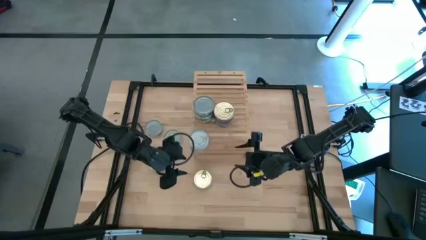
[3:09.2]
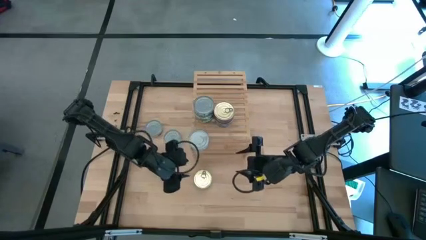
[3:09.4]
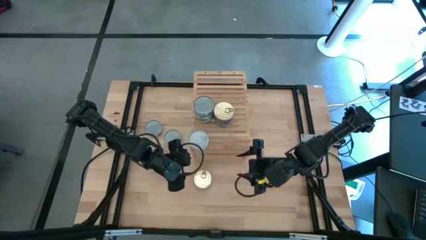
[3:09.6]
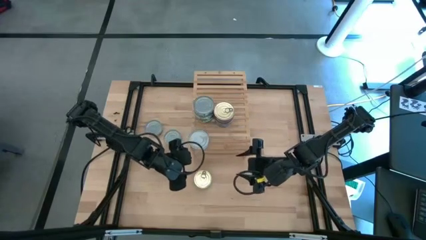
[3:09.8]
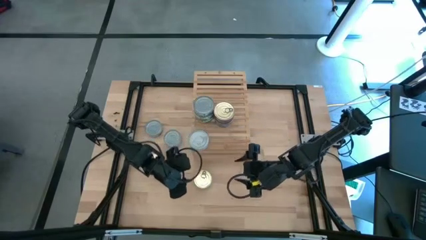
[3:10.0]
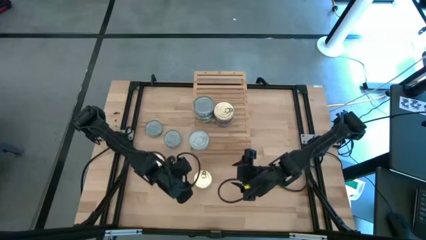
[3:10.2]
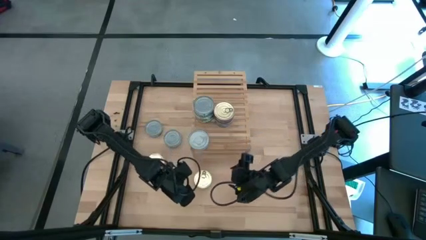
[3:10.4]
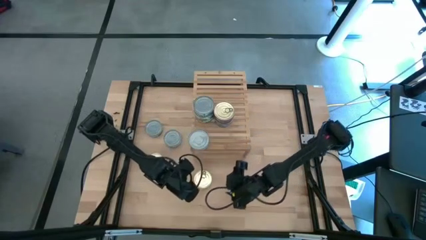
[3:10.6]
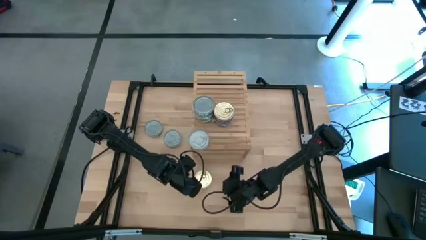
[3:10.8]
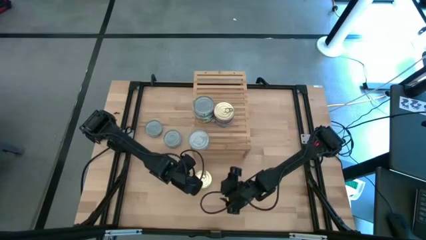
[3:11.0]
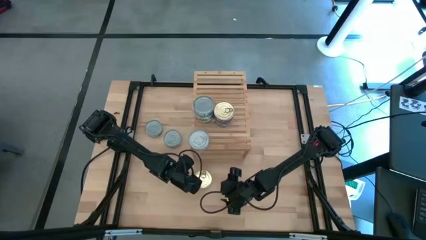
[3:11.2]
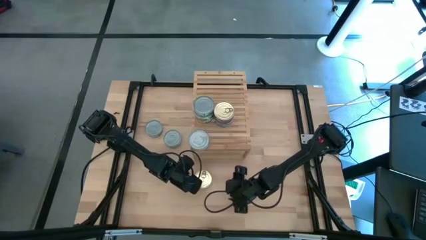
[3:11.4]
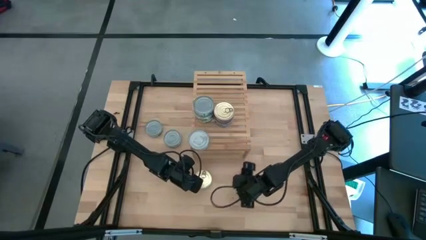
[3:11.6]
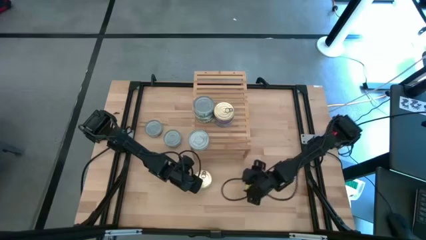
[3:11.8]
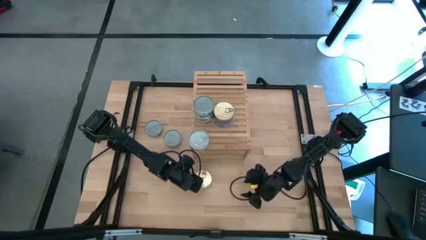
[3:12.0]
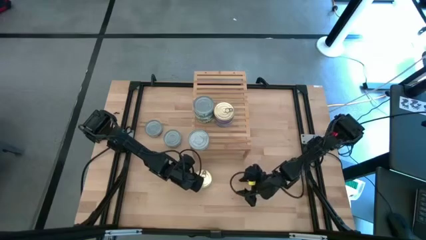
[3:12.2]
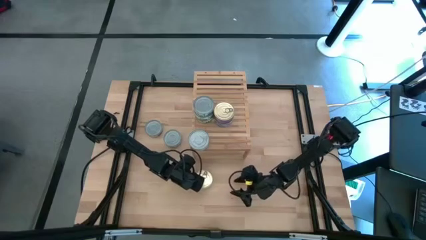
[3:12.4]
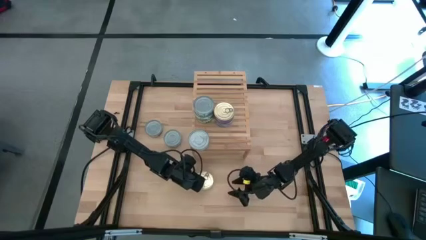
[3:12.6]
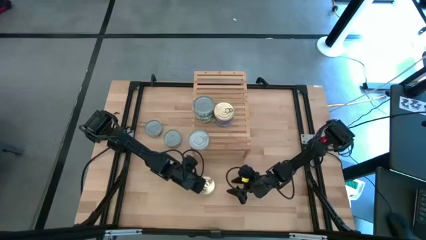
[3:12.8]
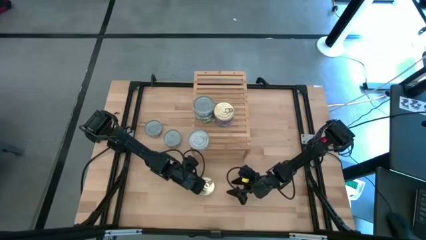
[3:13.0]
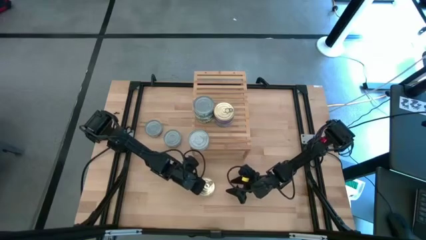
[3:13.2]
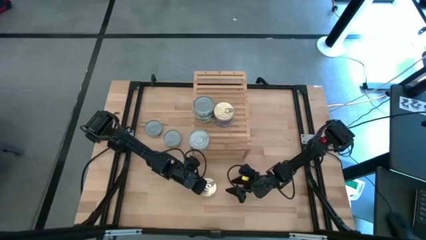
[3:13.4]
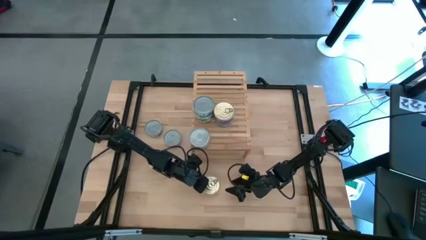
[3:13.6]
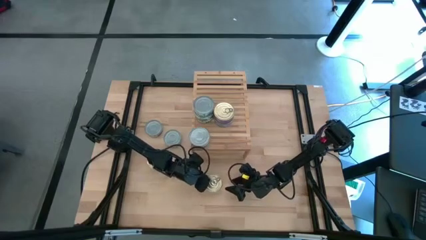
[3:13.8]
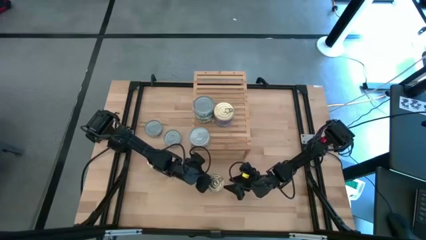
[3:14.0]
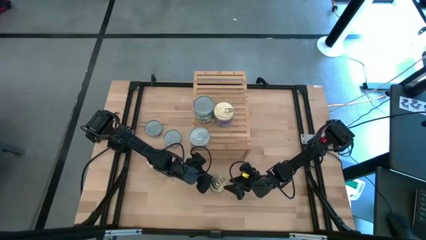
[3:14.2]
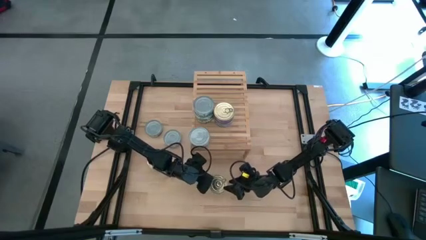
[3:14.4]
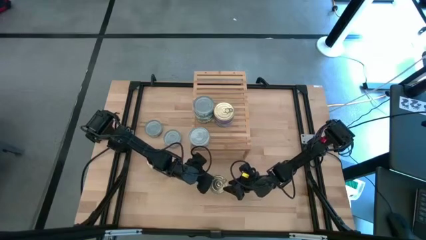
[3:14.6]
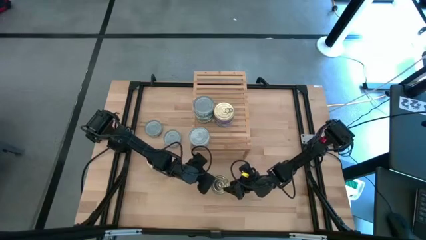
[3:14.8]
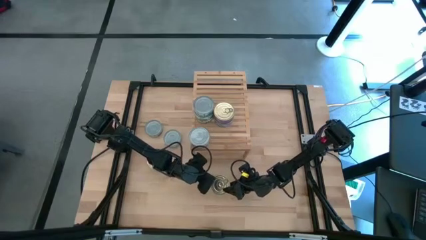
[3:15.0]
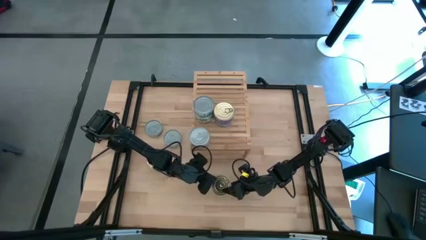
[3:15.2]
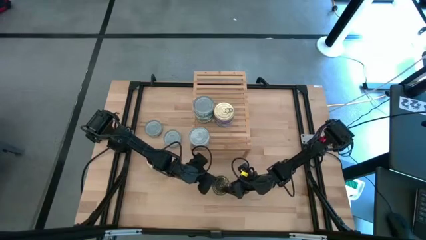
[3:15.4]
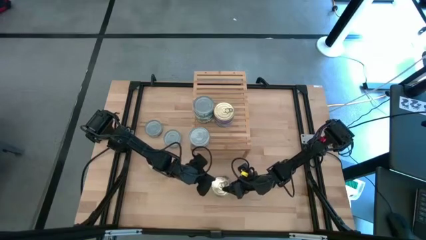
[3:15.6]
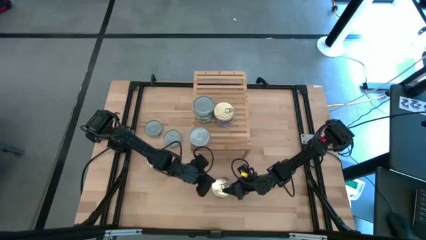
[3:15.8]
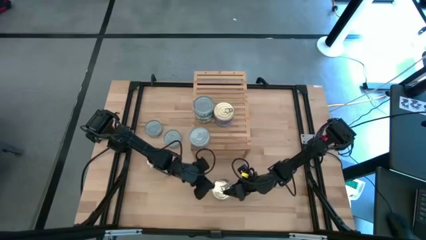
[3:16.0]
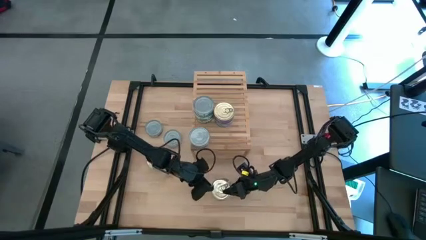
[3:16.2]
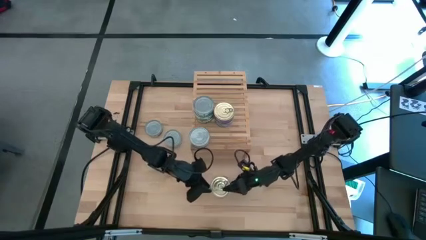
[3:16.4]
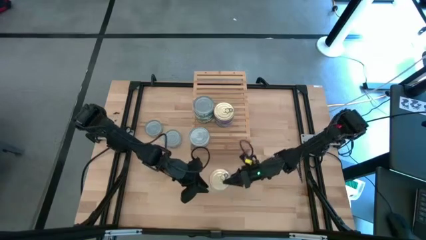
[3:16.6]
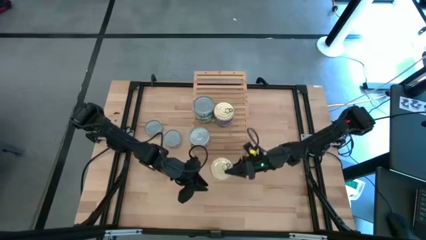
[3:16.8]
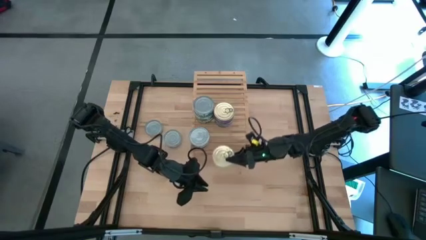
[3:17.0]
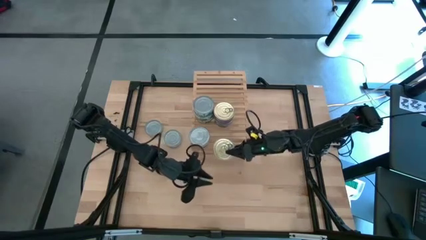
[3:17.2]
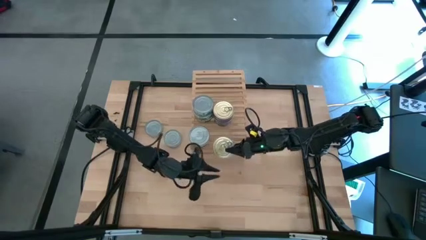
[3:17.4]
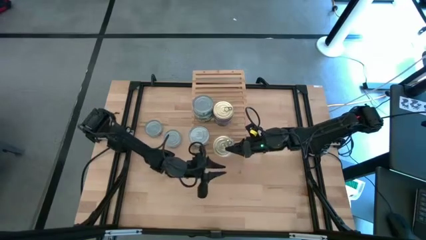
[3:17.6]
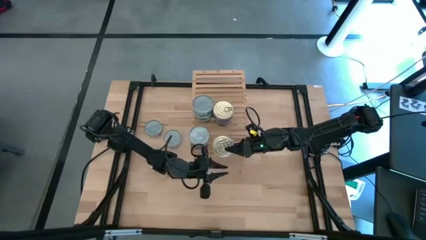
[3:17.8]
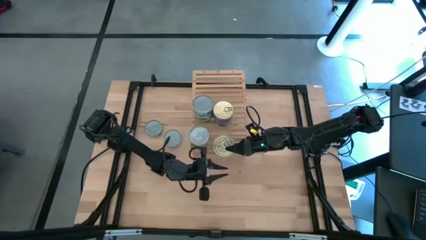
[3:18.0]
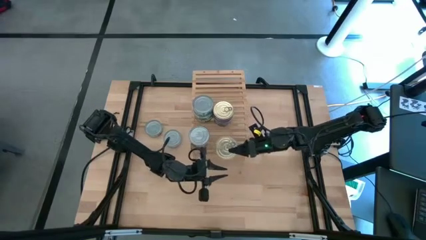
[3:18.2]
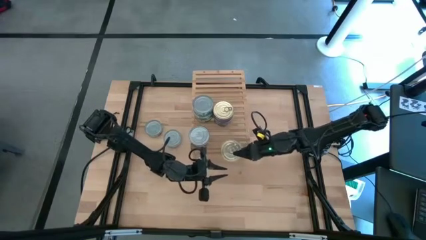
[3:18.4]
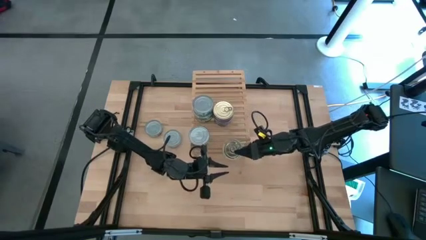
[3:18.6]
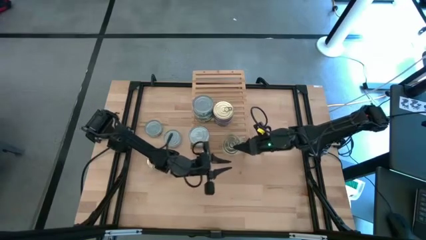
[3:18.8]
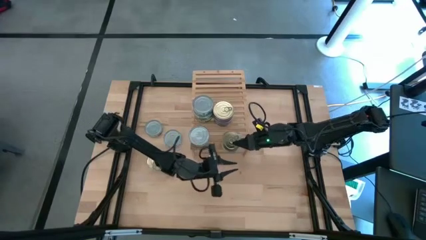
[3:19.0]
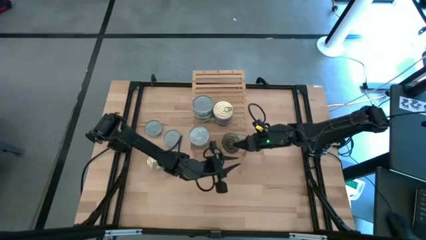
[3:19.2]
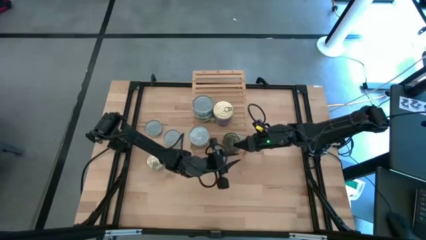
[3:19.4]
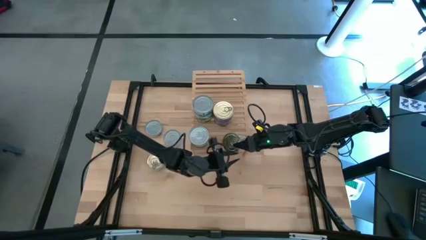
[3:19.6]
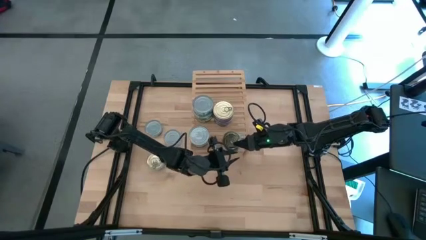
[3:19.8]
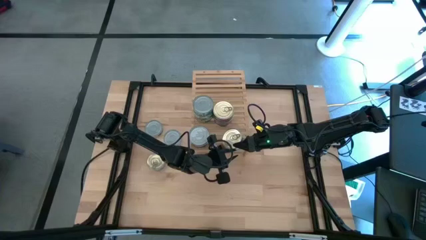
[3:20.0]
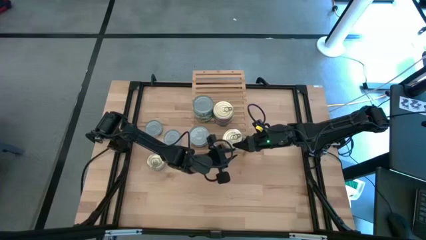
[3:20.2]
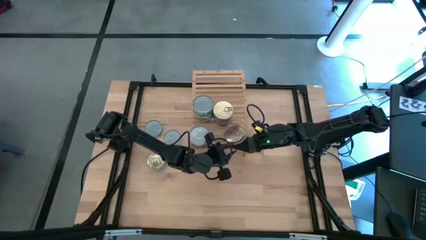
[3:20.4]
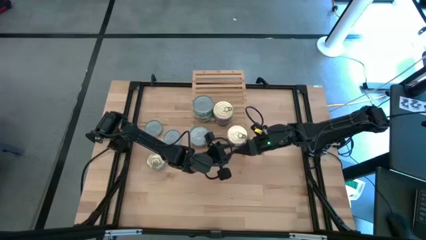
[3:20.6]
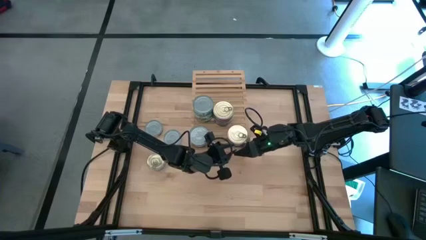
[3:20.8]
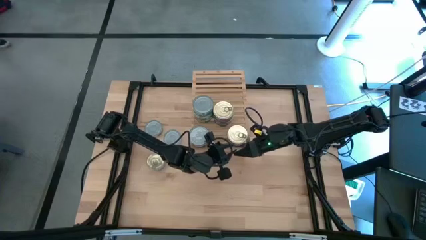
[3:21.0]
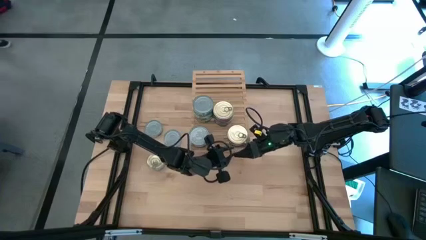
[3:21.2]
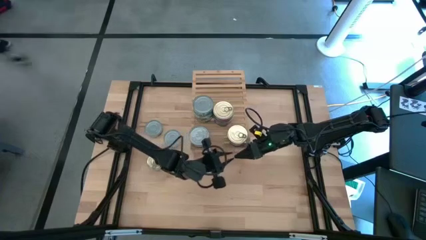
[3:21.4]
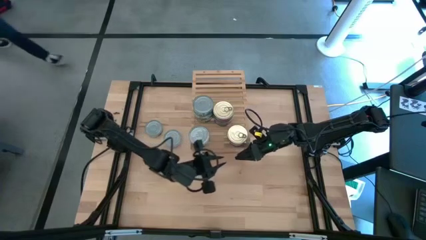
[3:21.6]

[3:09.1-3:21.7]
Task: Stack canned seafood by type on shelf
Put the blue tuna can on the shelf

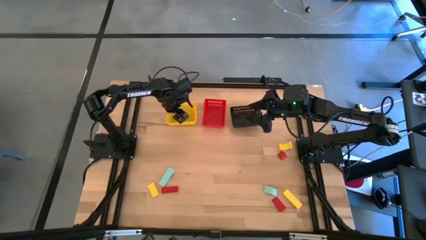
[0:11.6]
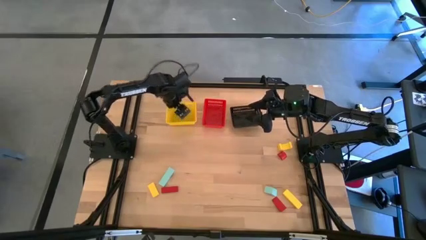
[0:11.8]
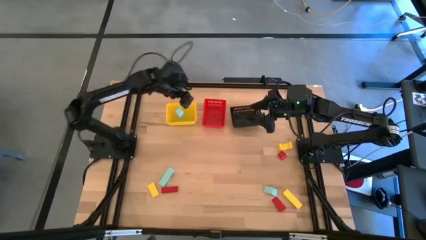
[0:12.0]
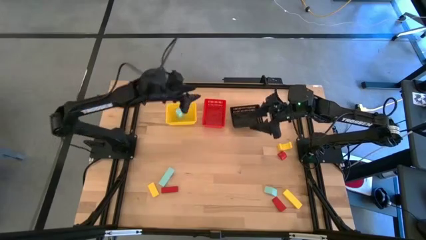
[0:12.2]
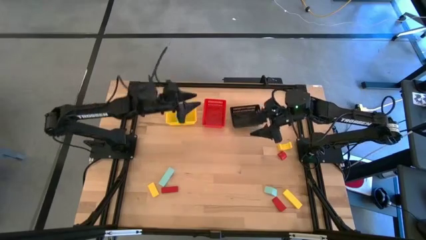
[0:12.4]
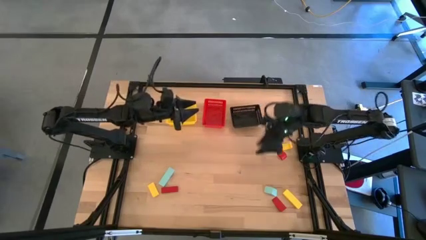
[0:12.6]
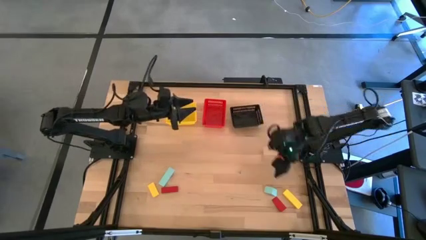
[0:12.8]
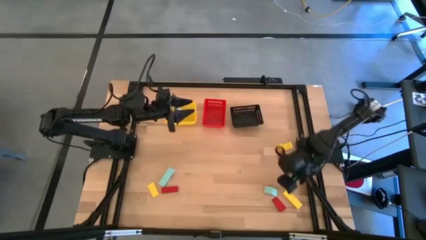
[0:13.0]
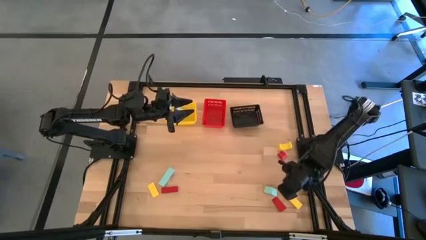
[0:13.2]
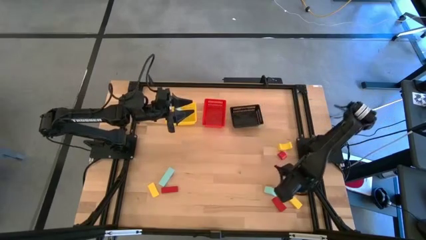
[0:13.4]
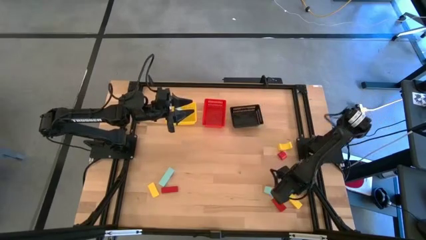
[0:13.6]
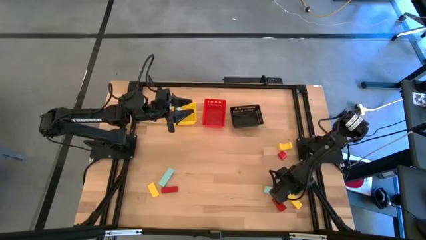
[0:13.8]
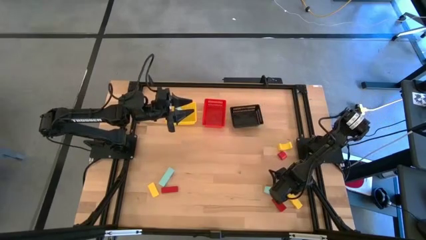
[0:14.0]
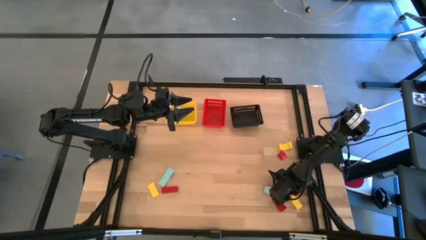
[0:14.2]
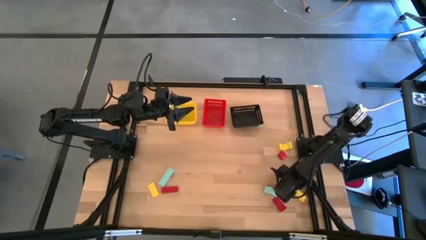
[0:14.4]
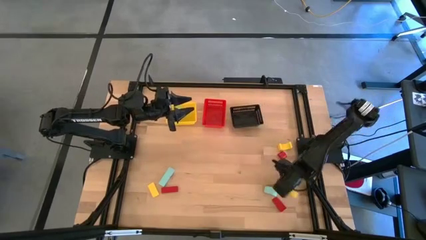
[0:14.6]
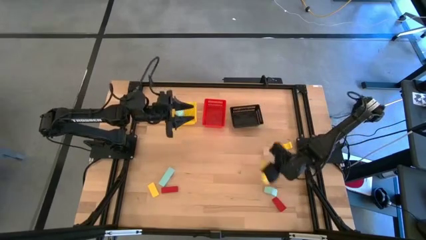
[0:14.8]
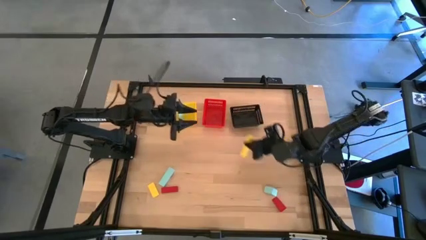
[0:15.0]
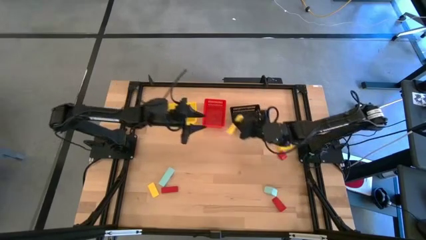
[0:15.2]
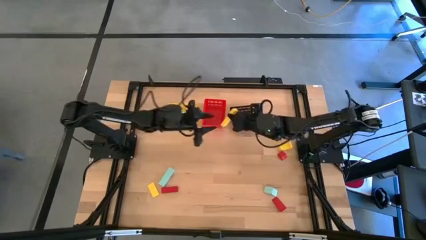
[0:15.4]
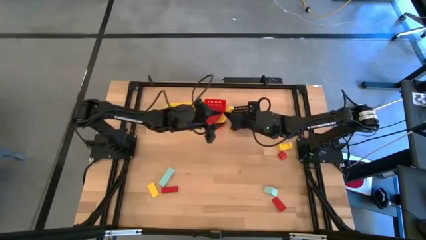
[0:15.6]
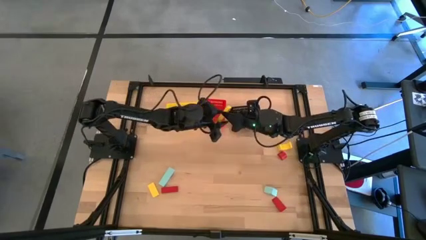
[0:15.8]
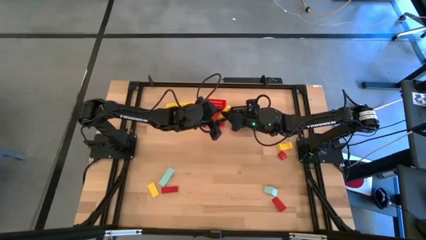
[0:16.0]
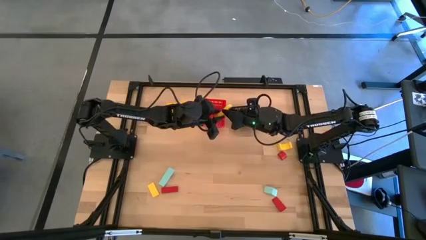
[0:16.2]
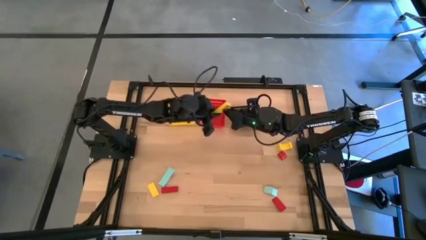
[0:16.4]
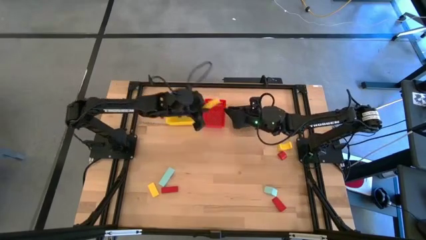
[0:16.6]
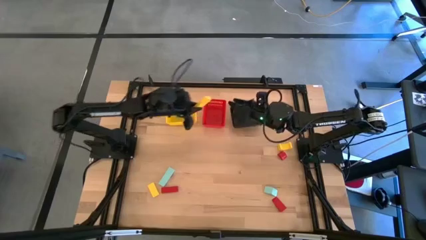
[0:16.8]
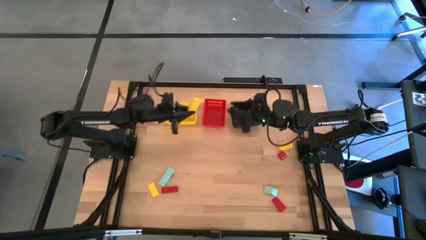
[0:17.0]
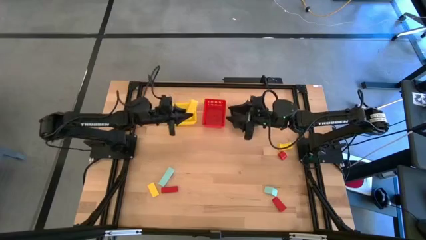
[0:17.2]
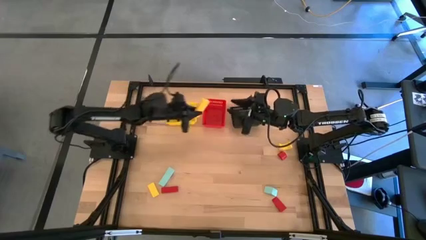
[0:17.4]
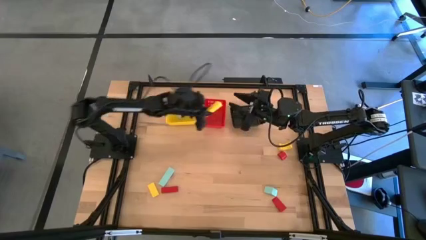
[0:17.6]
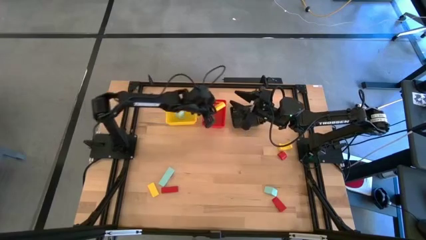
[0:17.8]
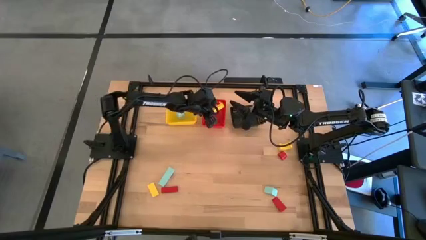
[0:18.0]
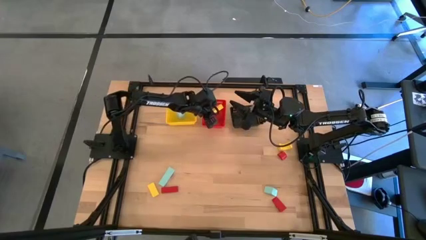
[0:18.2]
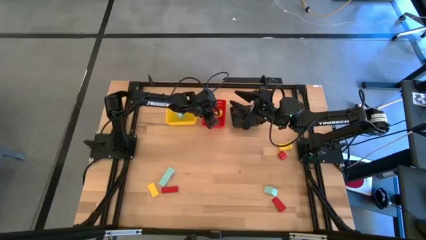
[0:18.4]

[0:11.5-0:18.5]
Task: Sort & place blocks by color
Put the bottom right yellow block into the red basket
